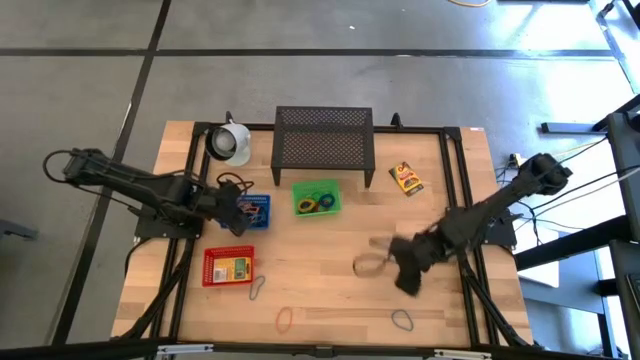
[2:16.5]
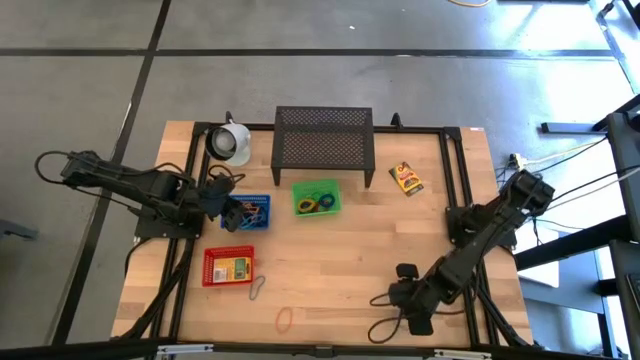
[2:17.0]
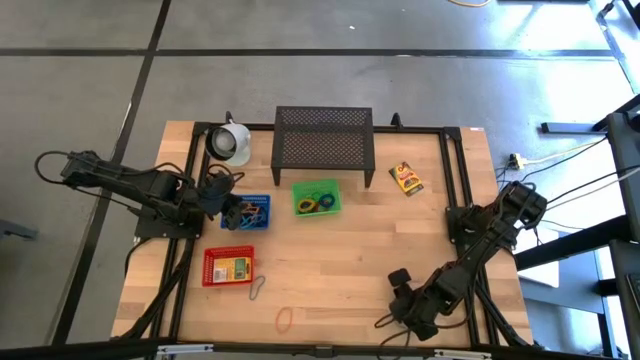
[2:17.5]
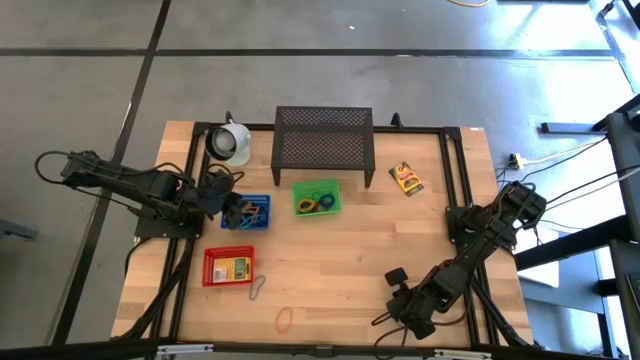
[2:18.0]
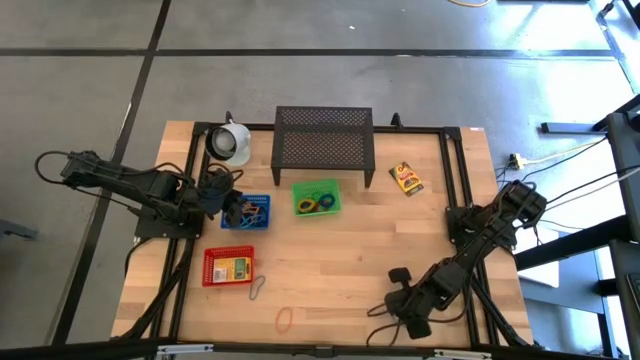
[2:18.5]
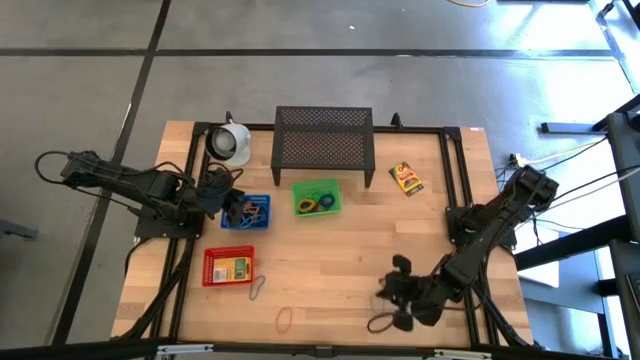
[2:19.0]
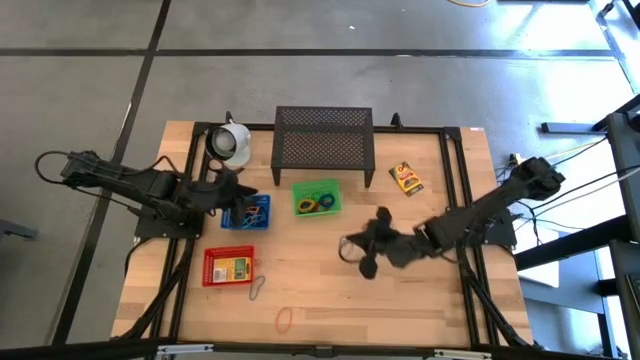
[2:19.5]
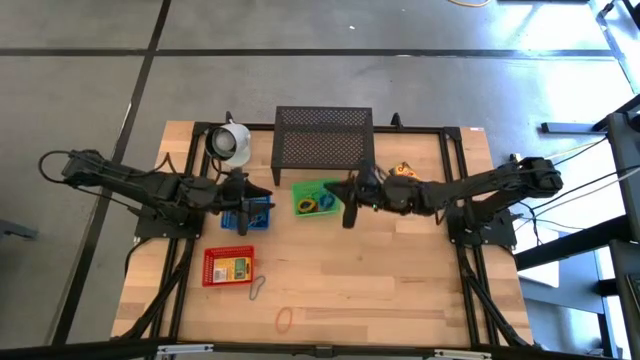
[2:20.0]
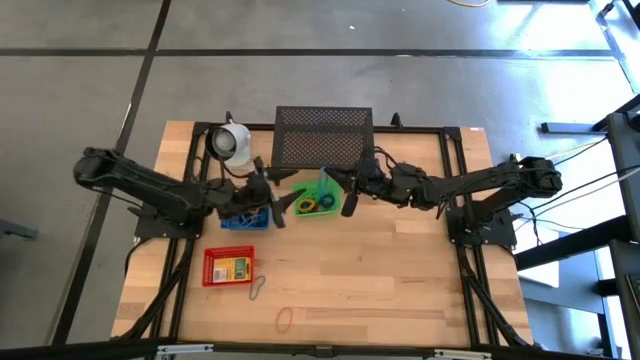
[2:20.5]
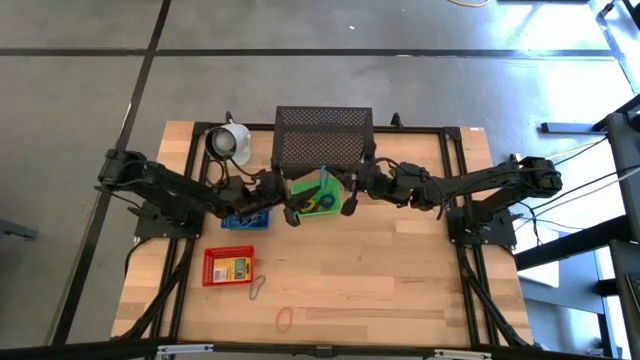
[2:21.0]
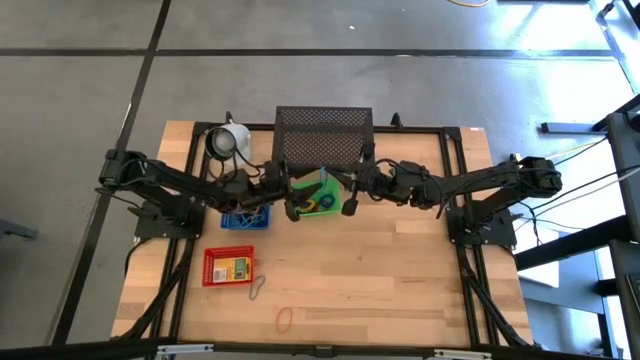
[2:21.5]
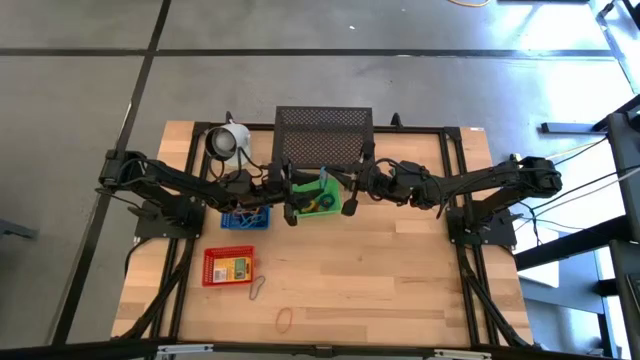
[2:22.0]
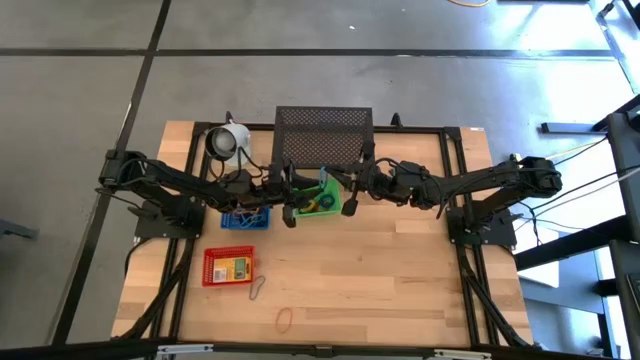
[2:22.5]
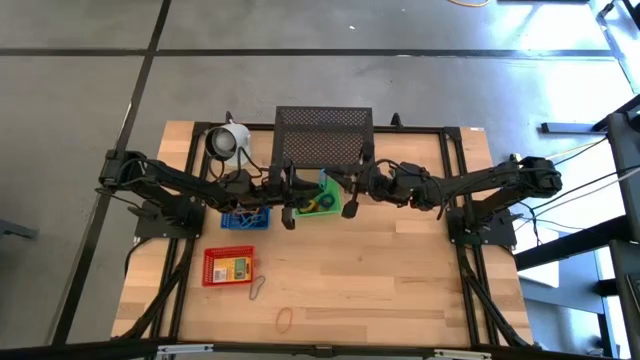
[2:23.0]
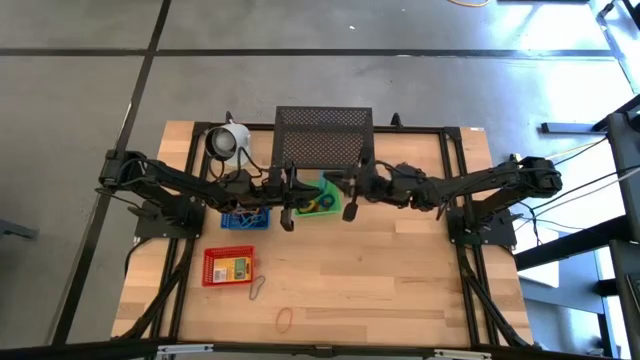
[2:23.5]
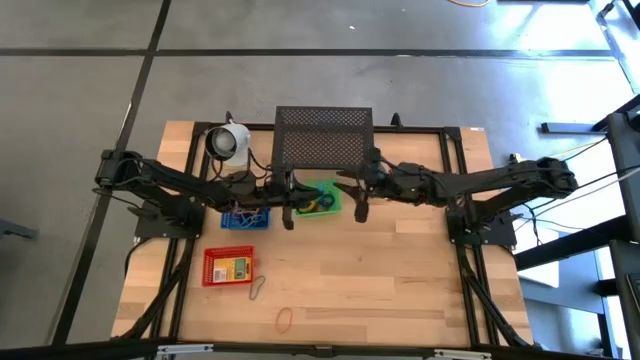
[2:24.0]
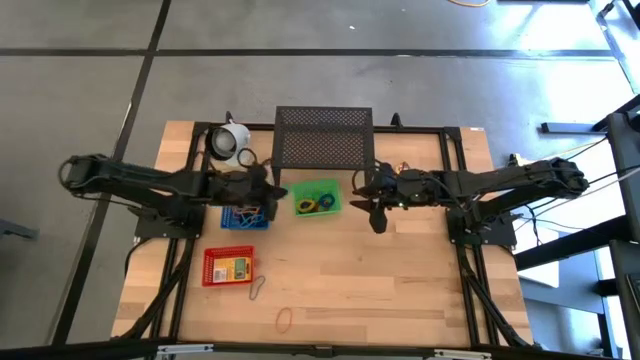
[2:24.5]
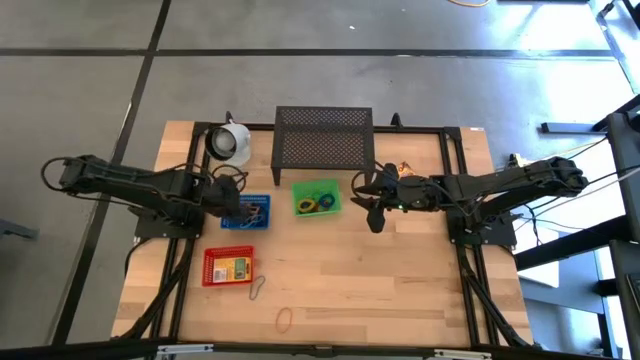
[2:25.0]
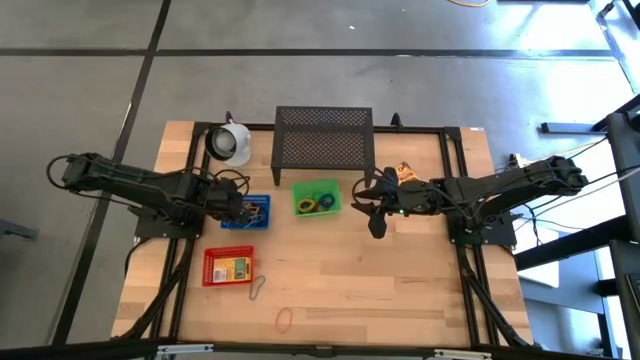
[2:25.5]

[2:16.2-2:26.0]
Task: Pick & Place Office Desk Supplies
Put the blue rubber band into the blue bin

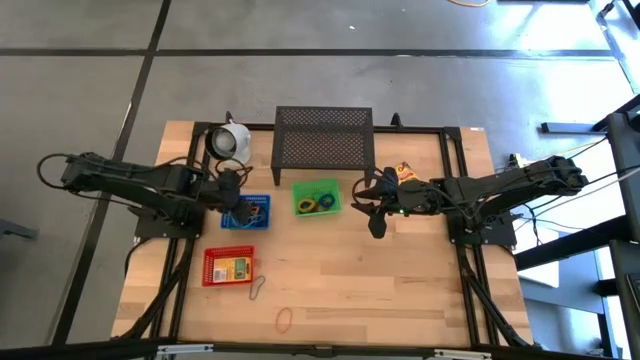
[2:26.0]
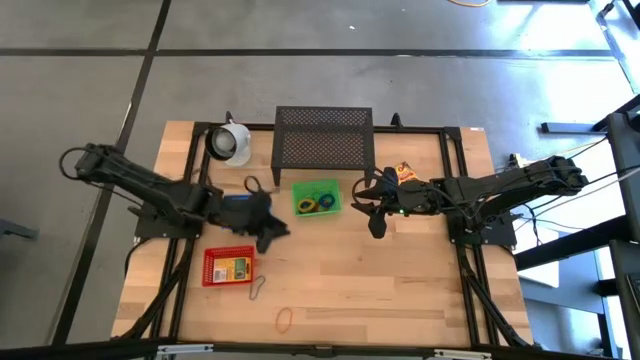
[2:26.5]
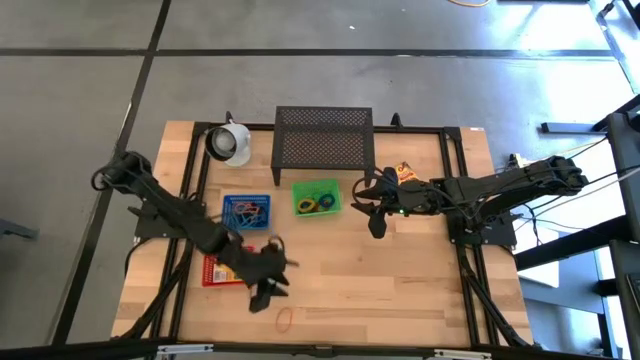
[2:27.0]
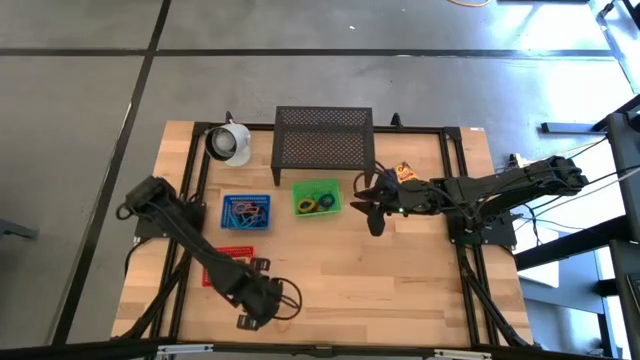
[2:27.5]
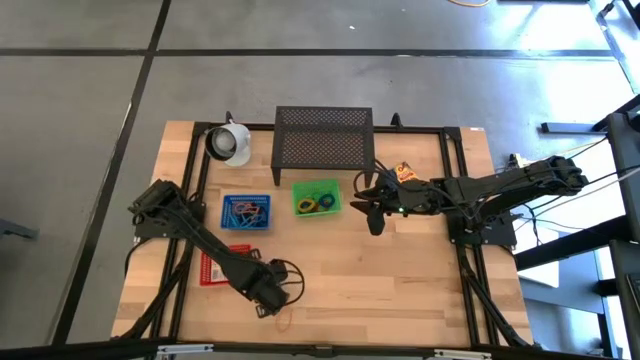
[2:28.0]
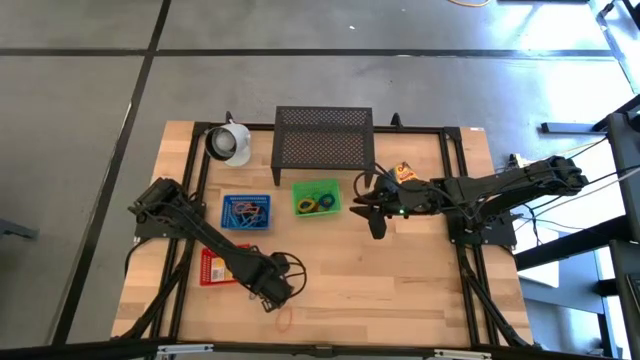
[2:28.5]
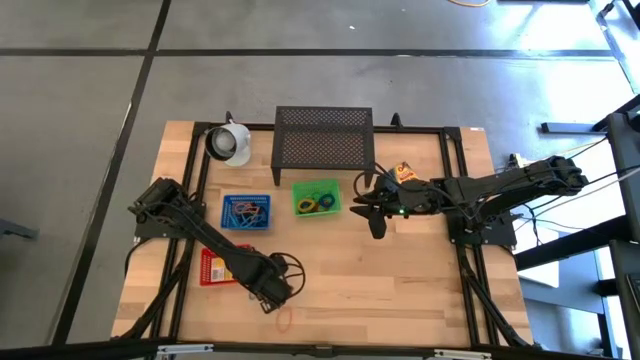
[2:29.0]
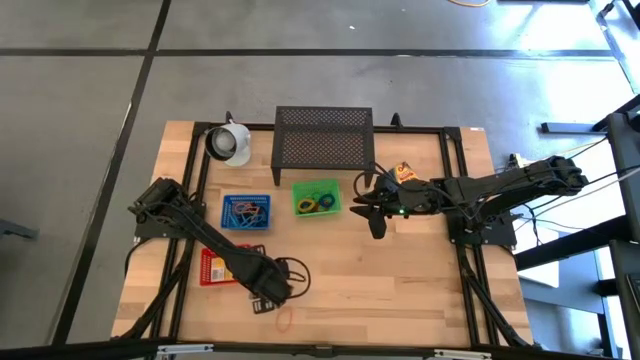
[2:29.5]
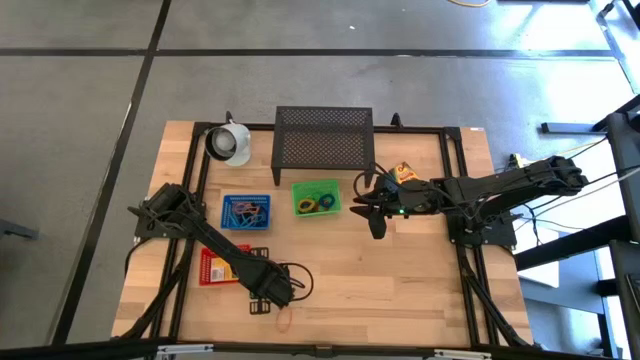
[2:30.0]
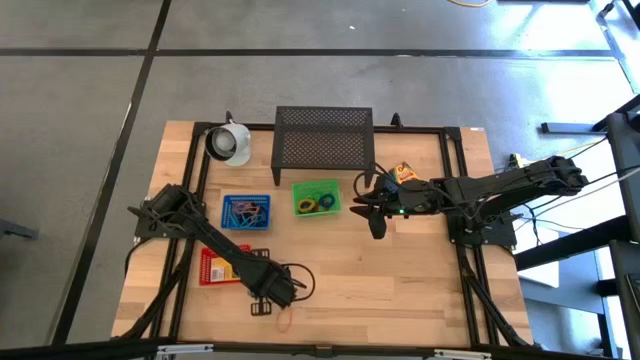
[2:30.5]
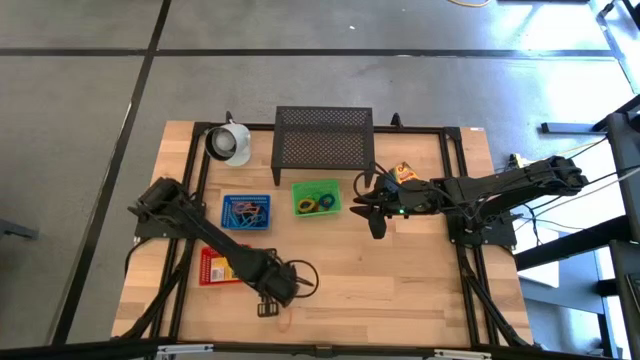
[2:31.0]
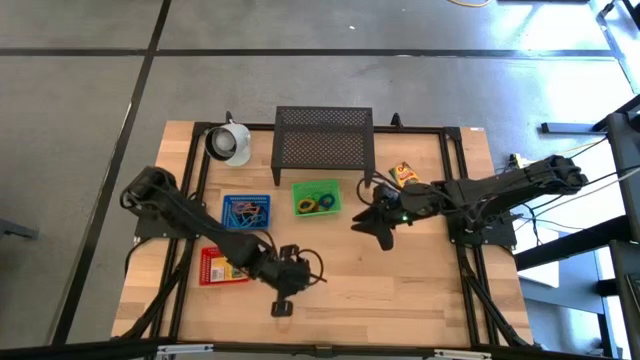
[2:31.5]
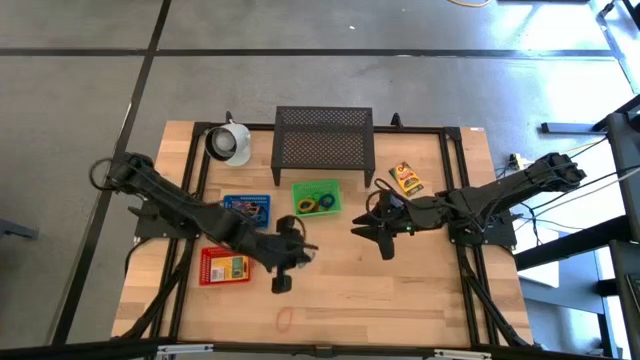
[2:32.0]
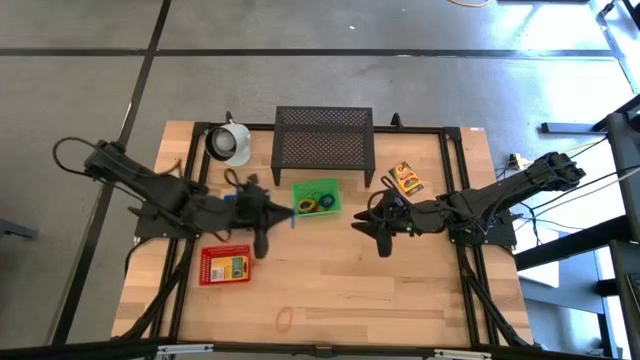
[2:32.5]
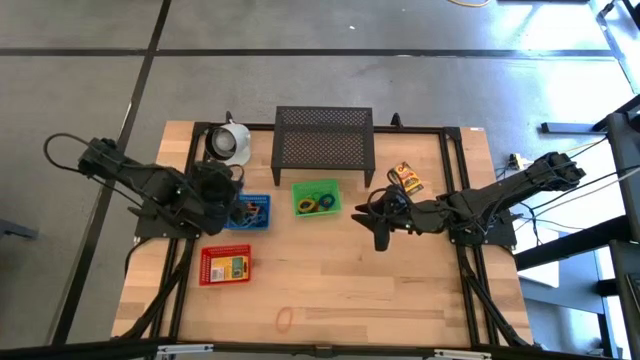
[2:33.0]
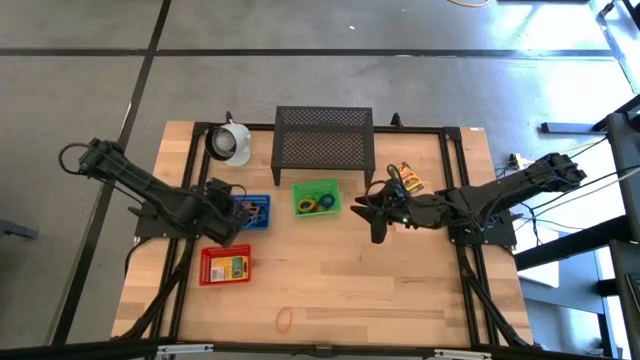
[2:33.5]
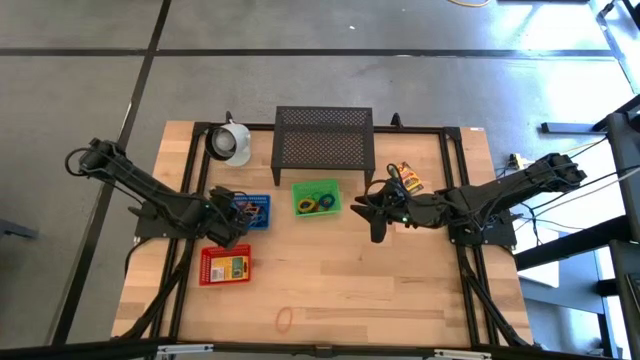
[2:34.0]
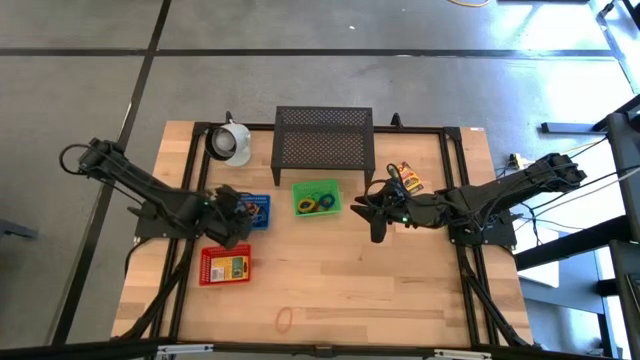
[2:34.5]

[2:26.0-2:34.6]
Put the blue rubber band into the blue bin

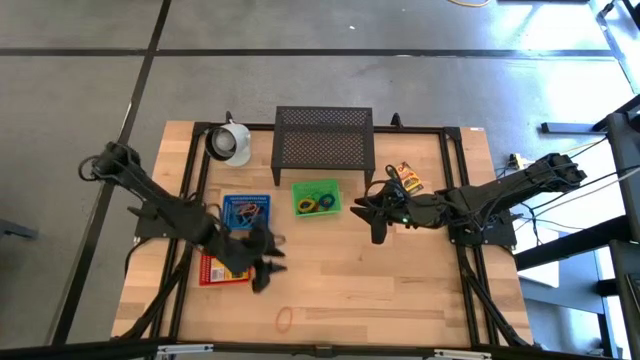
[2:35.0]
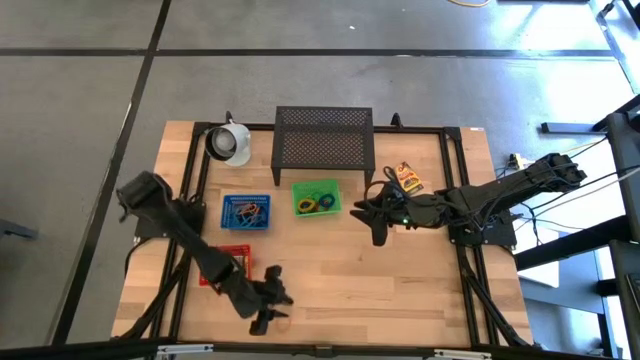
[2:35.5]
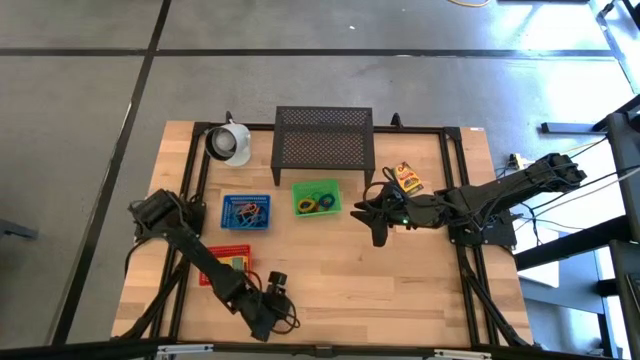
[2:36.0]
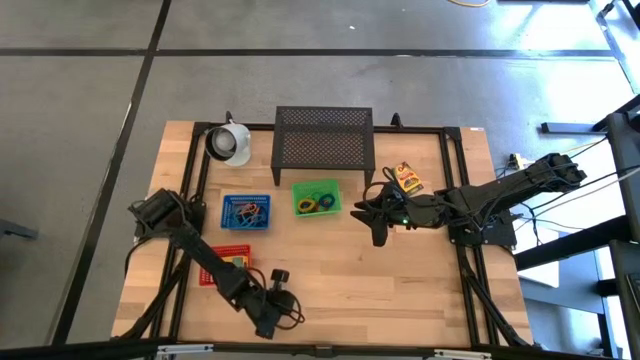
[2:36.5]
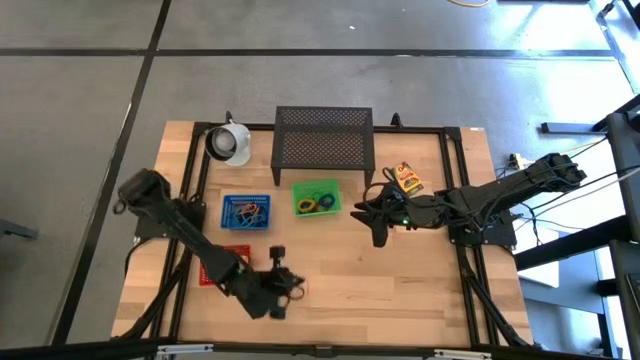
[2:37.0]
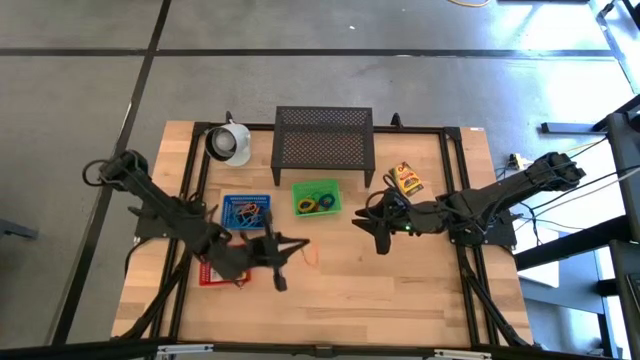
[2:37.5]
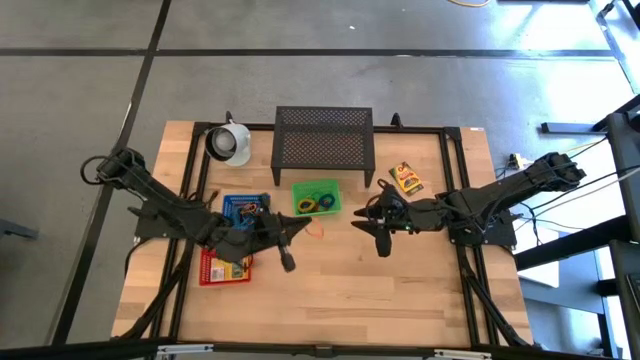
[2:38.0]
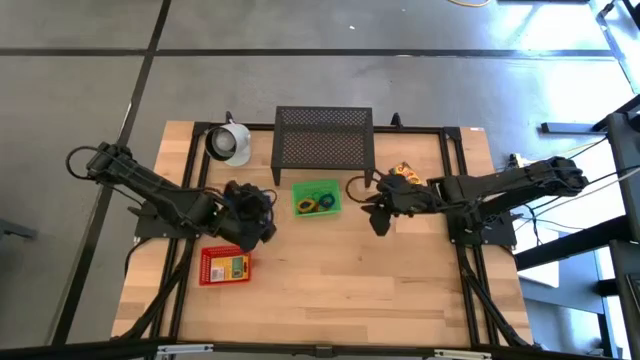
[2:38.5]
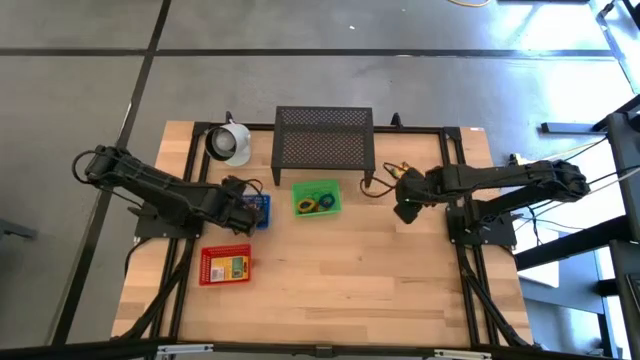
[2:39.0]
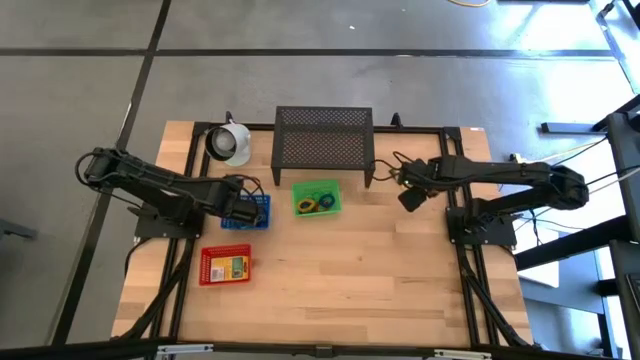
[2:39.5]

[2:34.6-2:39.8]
Put the orange rubber band into the blue bin
